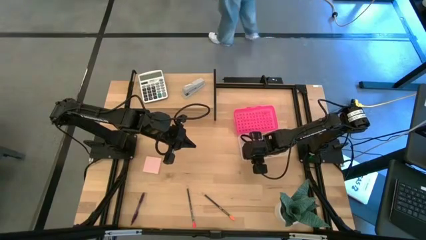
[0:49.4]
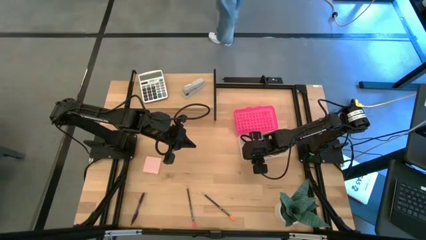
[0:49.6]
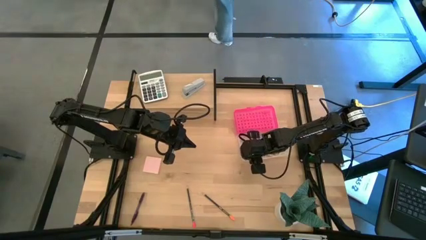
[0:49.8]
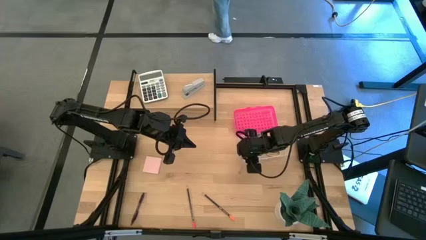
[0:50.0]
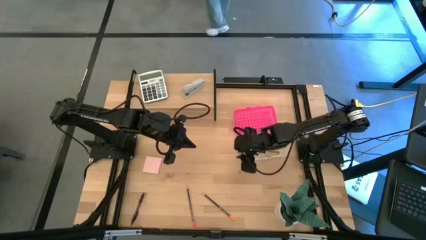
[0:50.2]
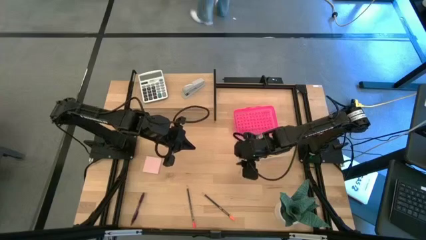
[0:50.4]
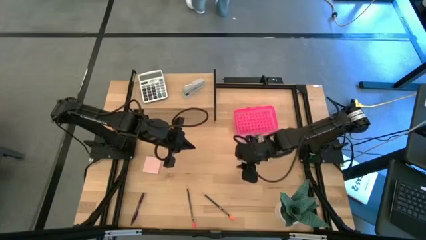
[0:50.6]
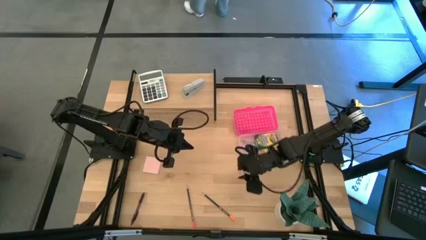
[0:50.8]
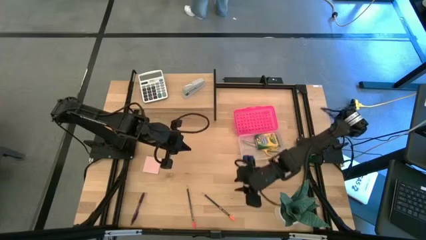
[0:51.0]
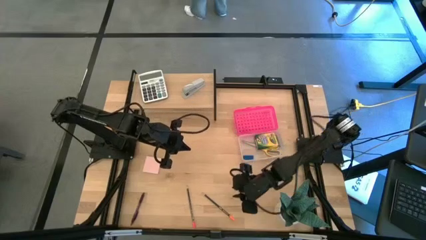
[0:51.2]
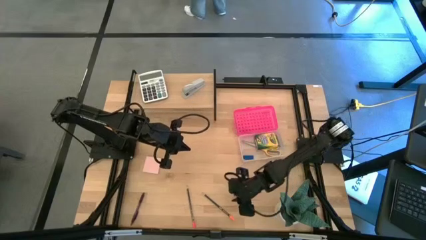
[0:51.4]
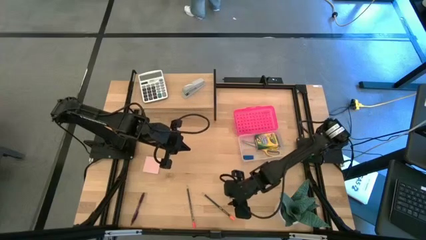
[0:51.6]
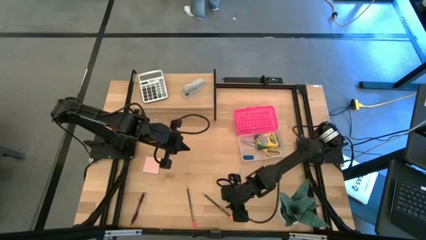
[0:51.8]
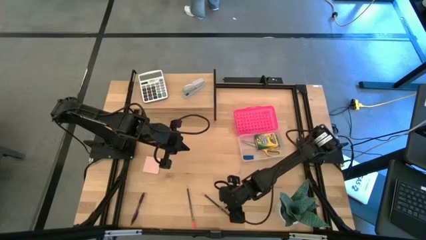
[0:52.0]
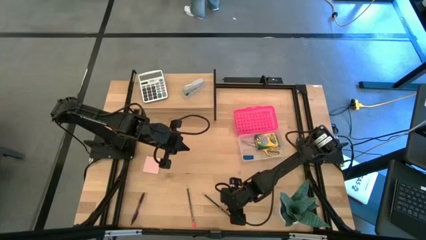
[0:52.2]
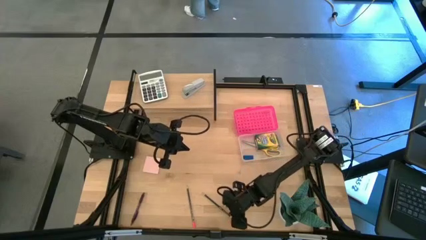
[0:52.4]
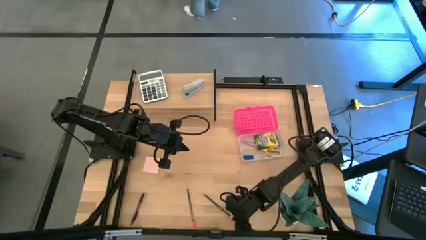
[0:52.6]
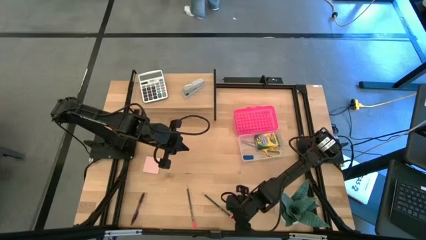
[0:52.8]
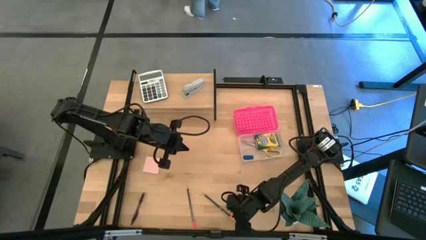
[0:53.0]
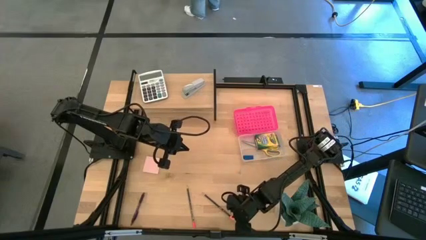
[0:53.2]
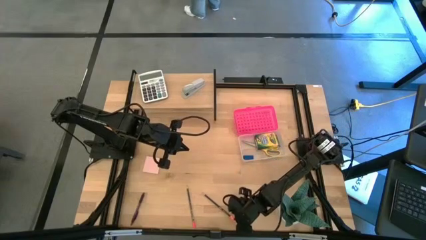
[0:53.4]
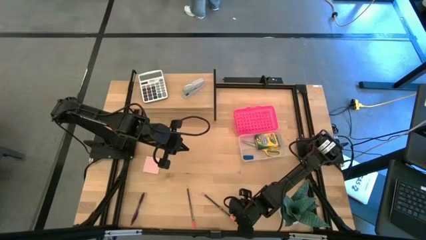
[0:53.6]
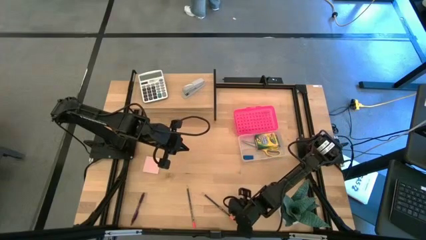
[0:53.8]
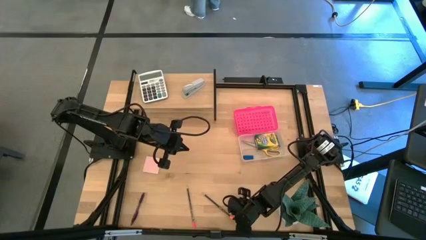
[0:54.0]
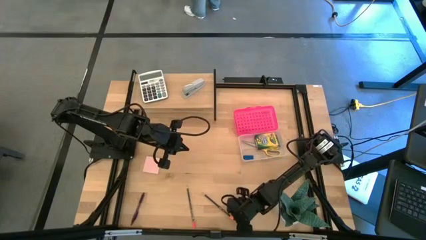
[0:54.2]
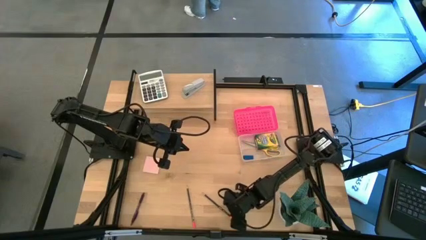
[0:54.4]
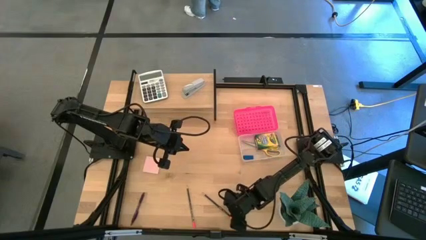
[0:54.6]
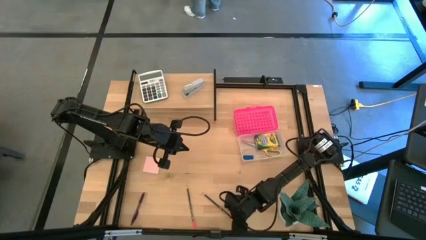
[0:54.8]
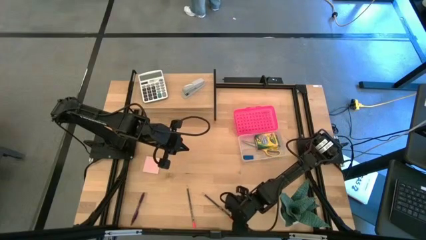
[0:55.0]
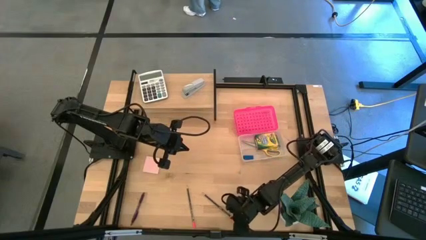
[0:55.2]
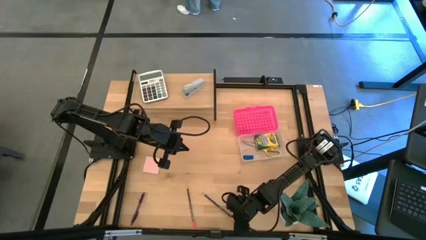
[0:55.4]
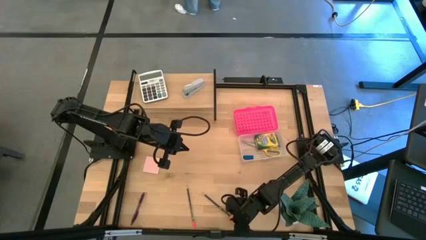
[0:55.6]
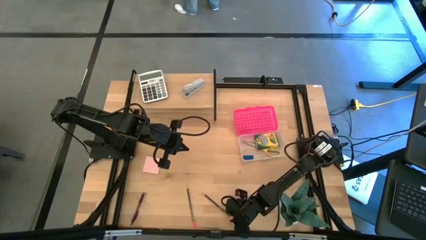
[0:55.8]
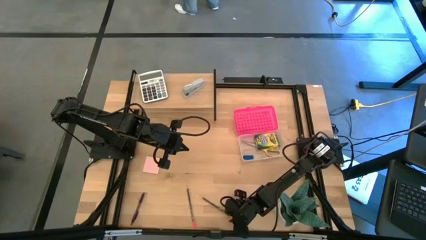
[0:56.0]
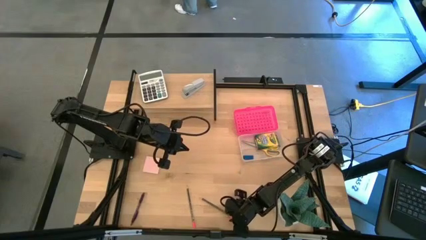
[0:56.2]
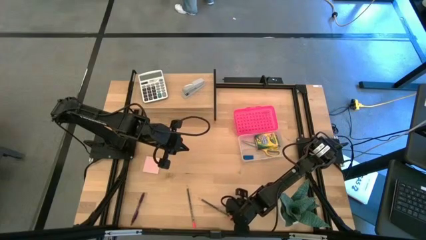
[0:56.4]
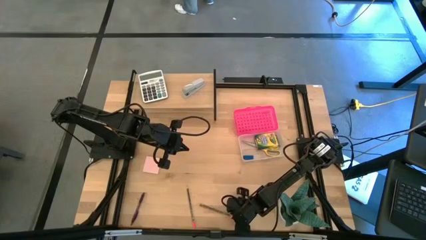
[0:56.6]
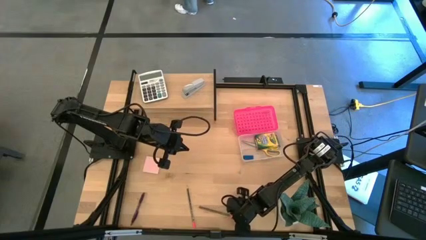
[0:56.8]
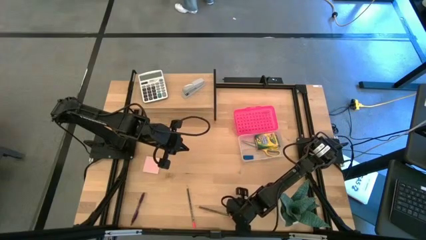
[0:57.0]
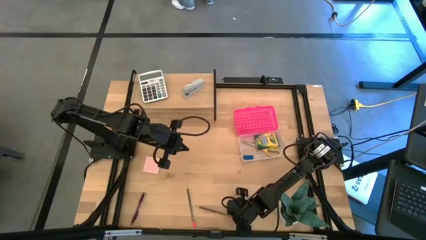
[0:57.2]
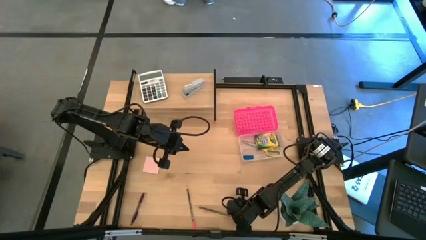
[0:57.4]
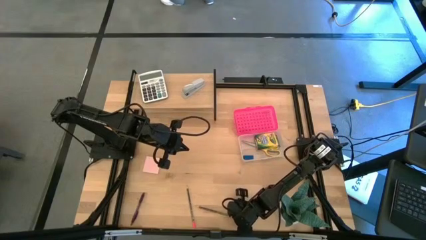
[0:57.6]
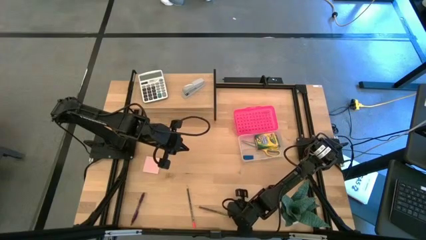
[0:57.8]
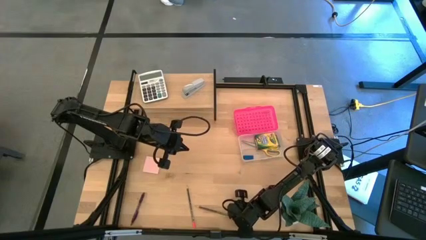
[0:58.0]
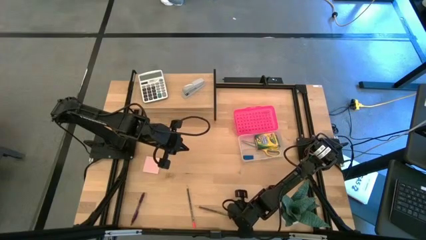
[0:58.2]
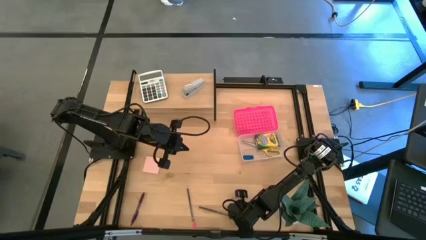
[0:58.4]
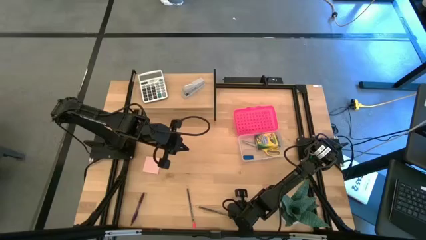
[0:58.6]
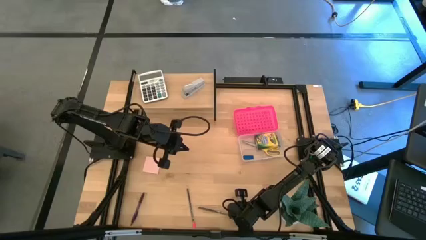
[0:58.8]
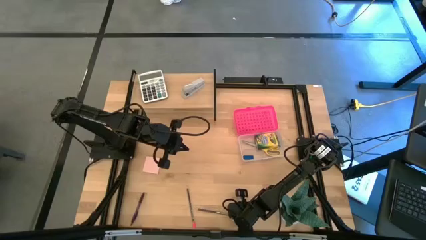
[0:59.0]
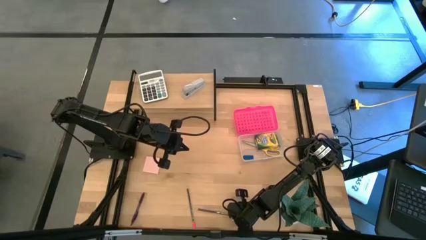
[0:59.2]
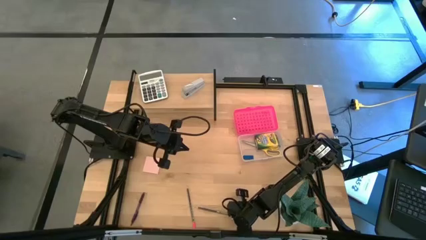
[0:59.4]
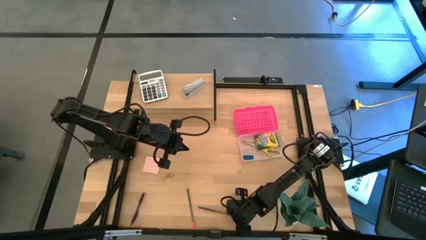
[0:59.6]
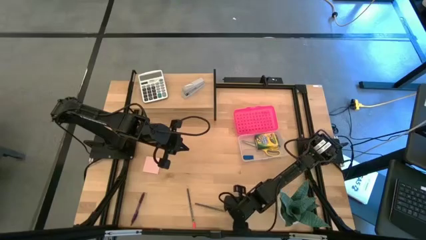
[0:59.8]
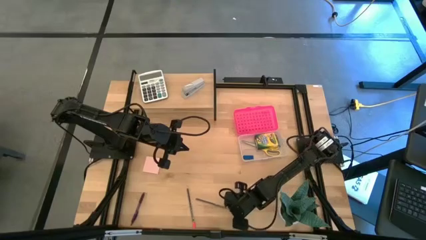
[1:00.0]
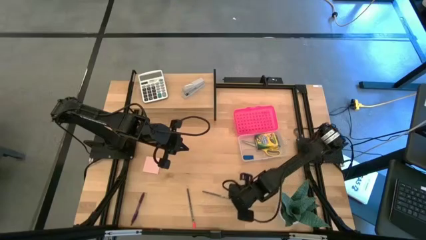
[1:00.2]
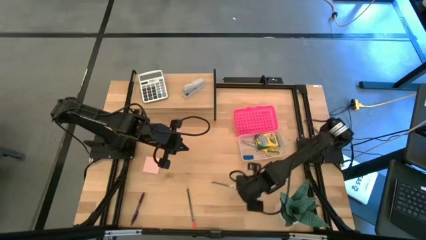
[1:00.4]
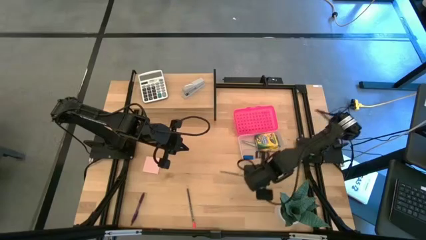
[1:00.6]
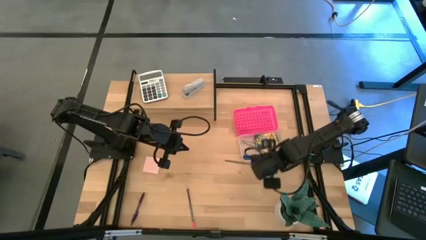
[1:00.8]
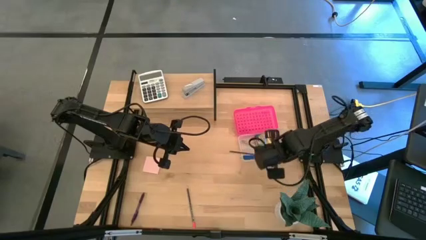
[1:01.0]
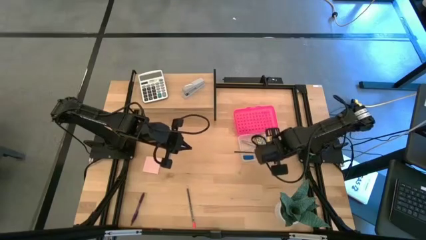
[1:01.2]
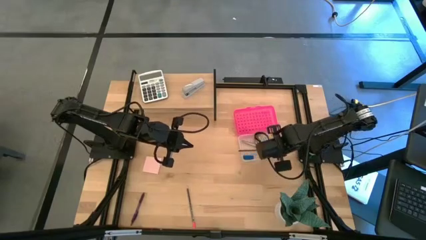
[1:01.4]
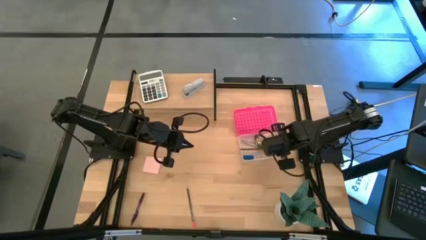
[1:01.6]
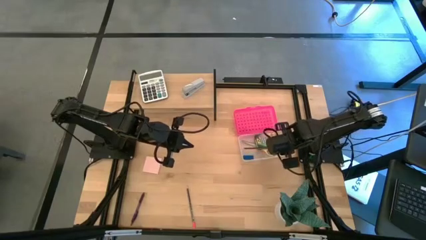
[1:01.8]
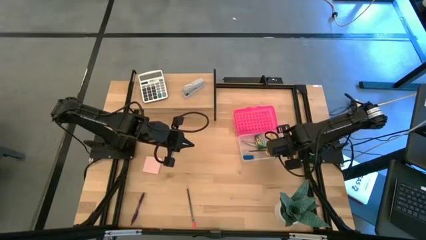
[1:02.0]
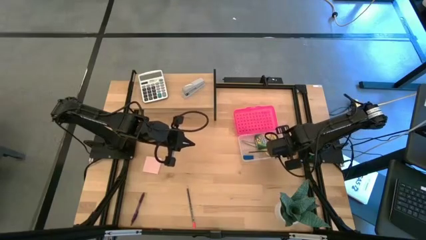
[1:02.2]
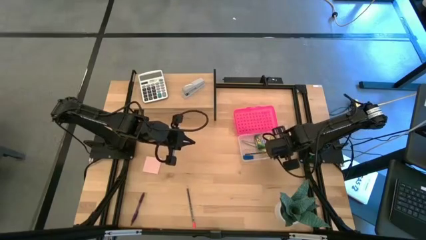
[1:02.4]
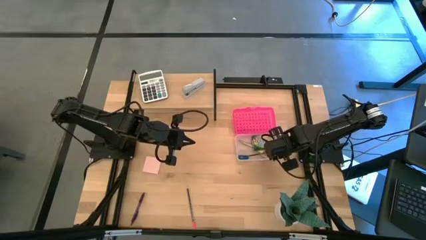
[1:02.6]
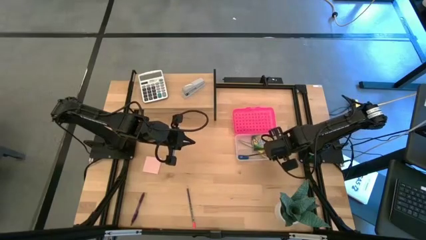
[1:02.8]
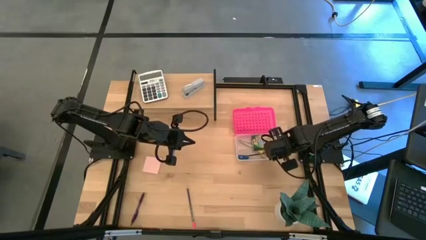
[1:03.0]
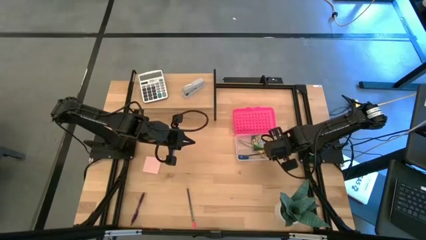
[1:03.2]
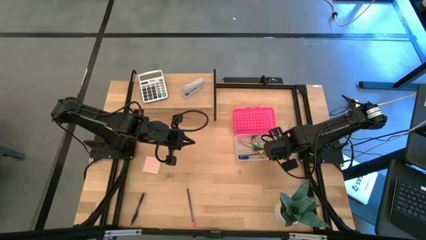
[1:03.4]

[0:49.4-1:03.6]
Task: Pack school essentials
Put the orange pencil into the pink supply box

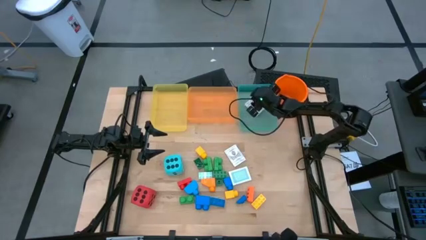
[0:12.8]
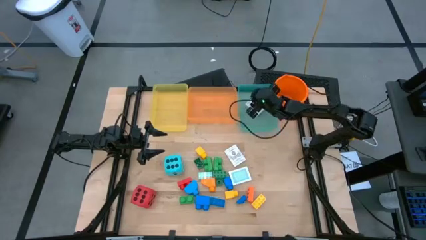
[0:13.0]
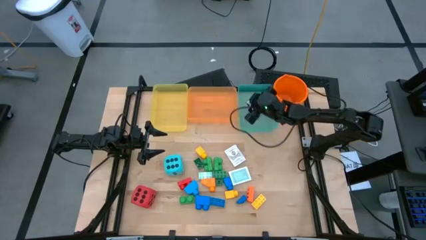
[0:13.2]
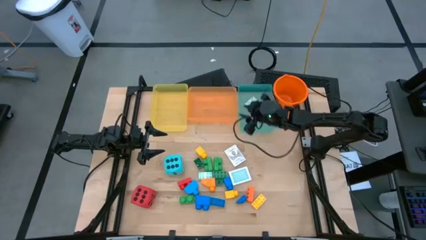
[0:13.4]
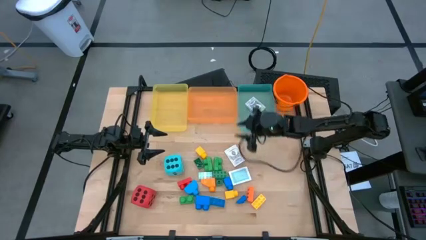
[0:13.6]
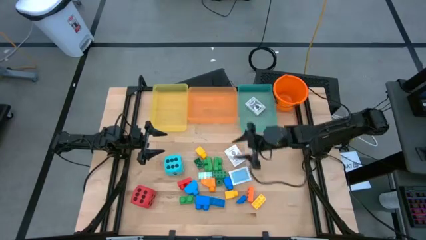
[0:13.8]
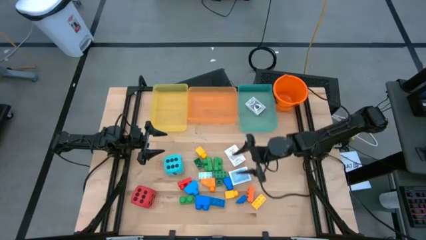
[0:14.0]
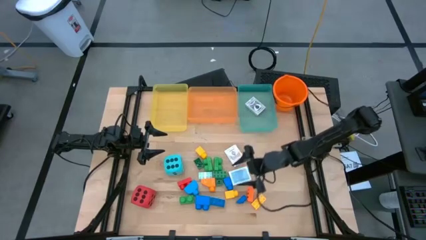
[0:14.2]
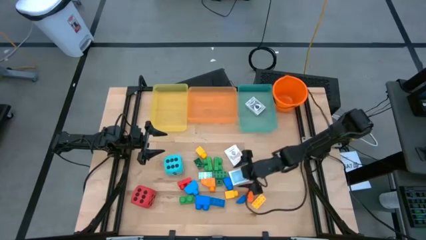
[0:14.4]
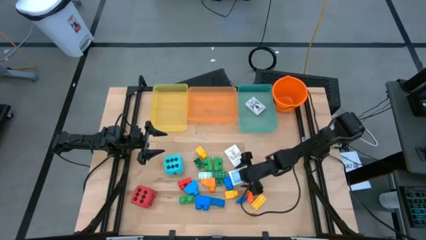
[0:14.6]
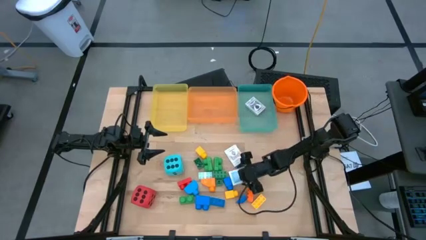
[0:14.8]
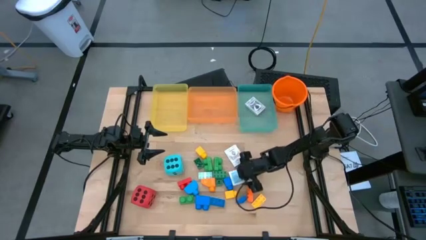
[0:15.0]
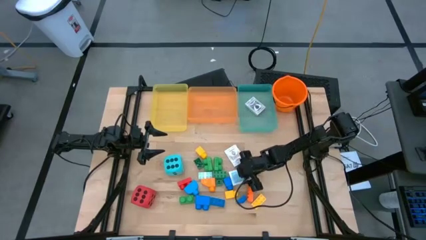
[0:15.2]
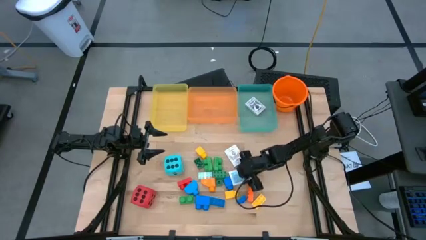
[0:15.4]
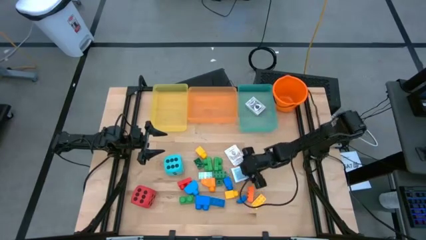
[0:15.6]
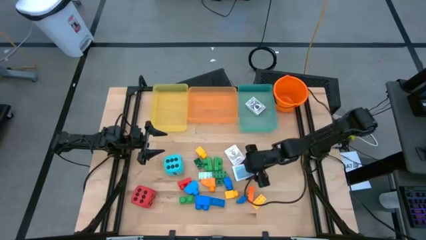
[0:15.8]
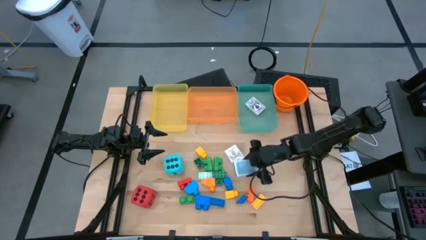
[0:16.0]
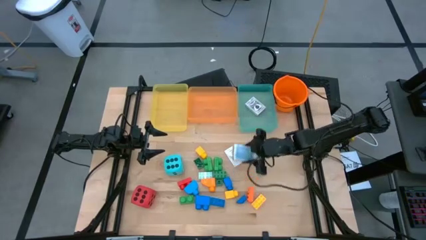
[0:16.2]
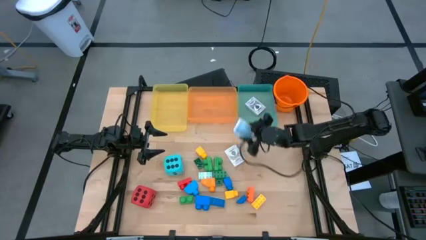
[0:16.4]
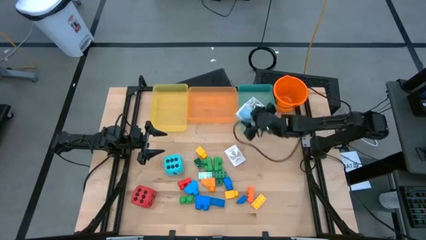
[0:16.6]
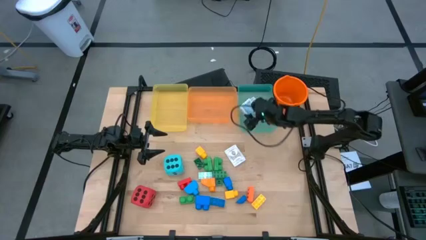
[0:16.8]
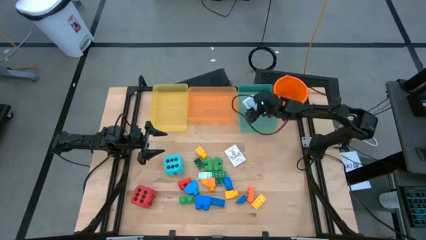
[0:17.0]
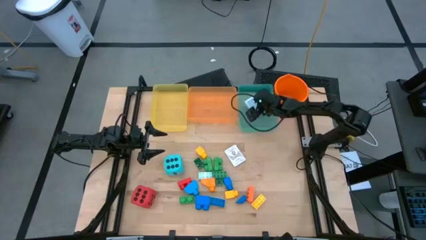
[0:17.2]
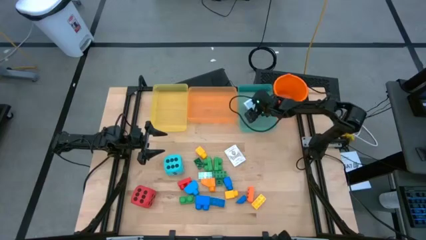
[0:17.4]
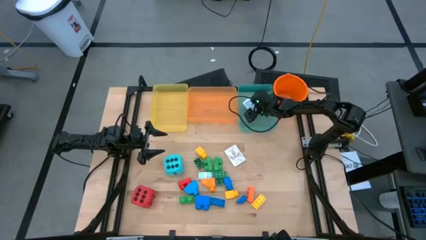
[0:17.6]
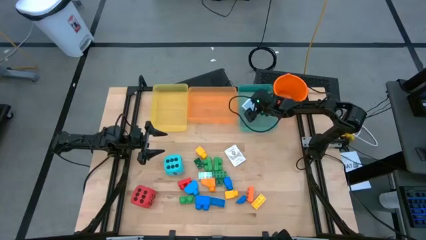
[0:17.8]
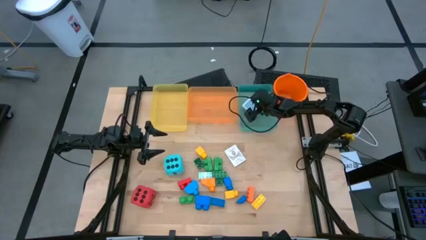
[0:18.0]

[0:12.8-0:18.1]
Task: Pick & Place Toys
Put the blue game card into the green bin
